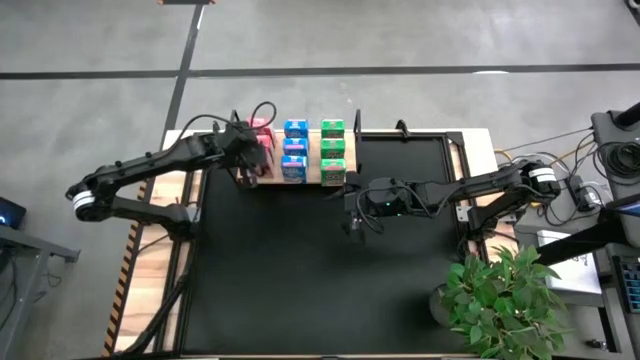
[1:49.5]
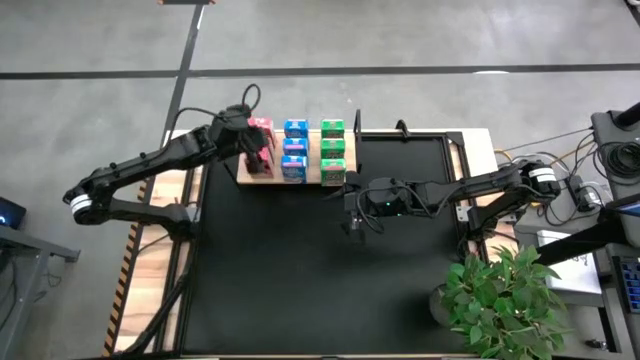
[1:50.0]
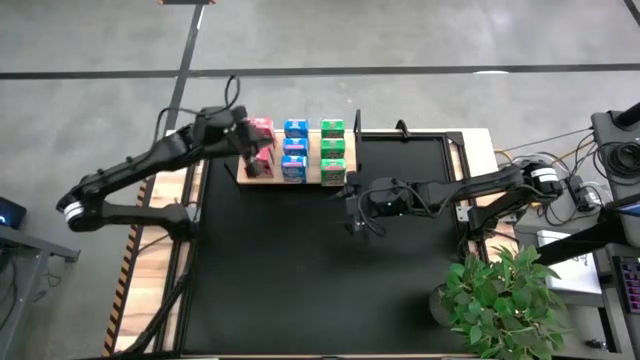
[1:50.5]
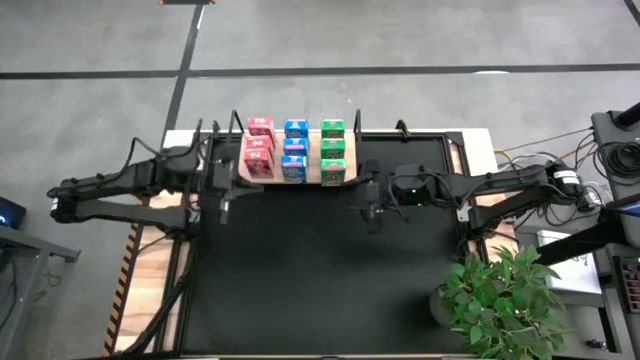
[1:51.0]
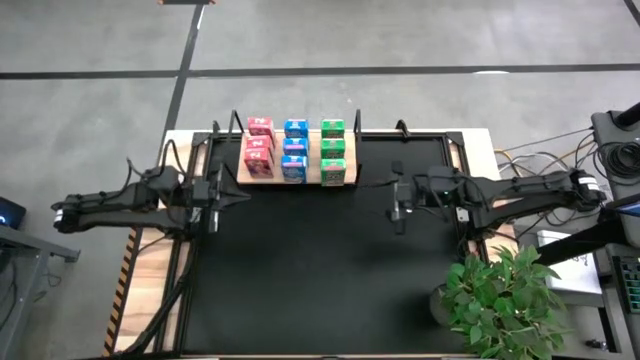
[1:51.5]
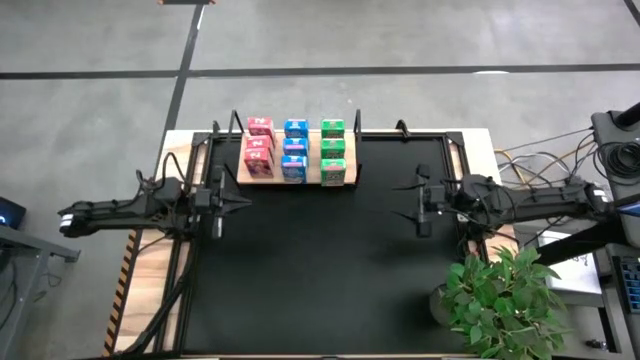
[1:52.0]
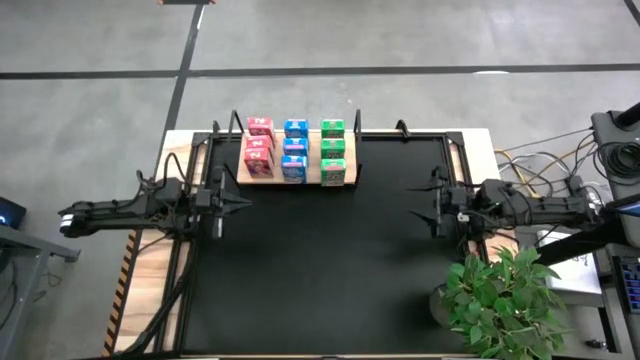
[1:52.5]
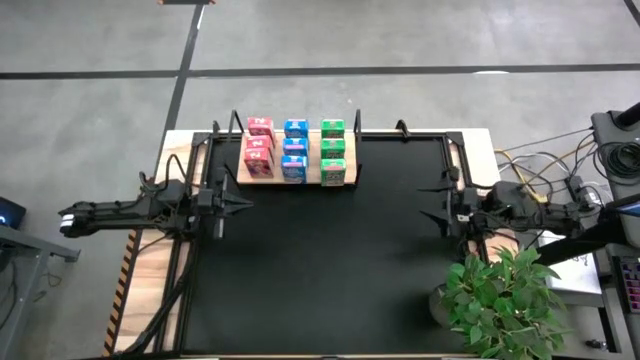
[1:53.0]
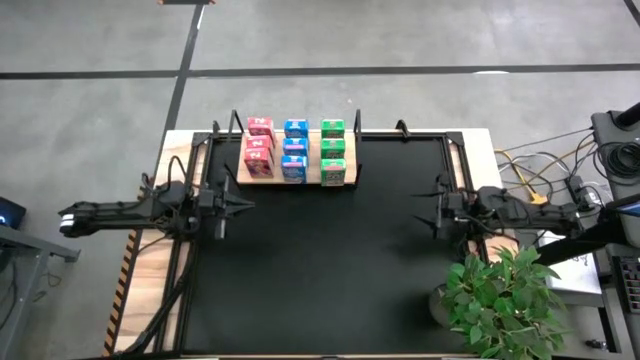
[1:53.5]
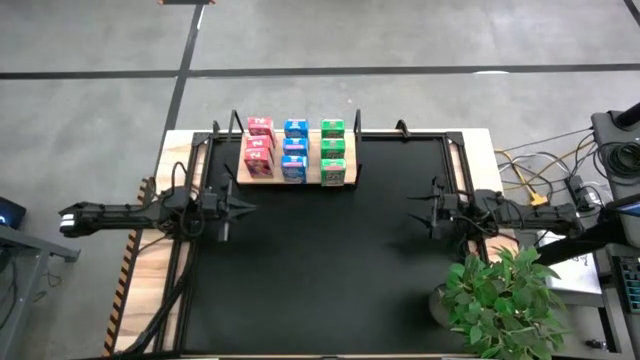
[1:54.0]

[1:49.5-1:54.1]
Task: Stack cereal on shelf
Return to Home Position

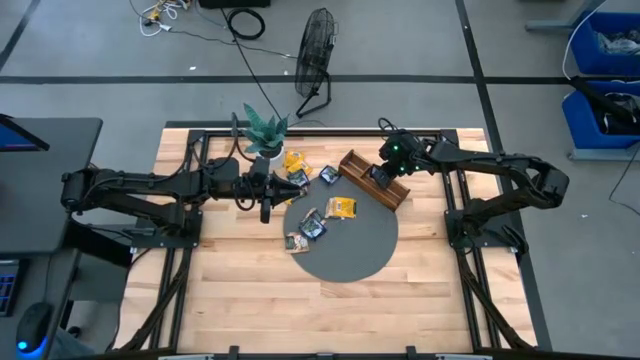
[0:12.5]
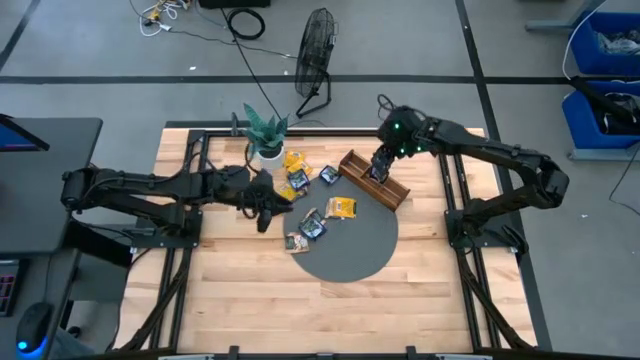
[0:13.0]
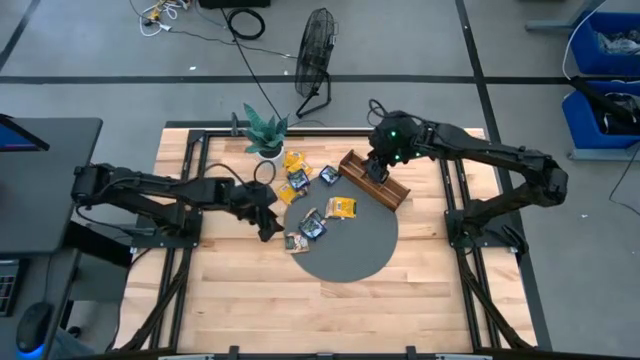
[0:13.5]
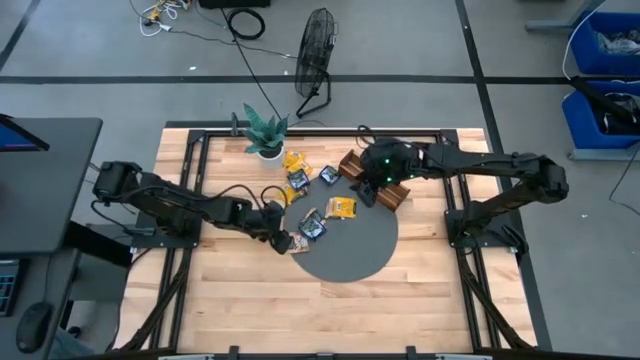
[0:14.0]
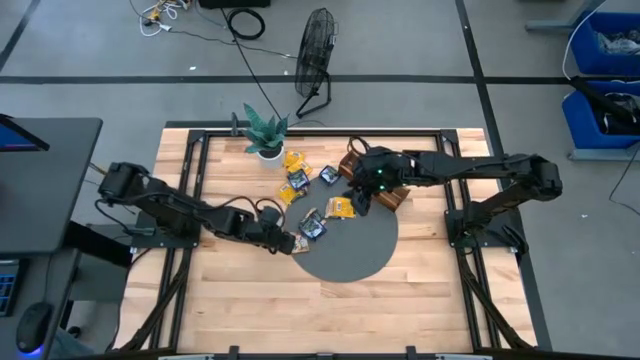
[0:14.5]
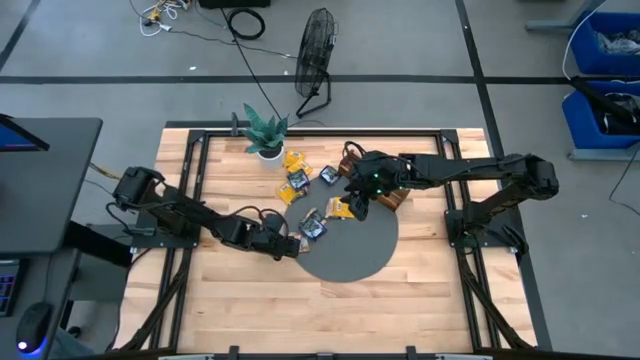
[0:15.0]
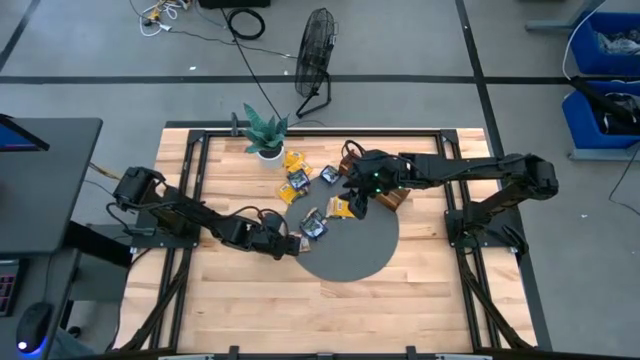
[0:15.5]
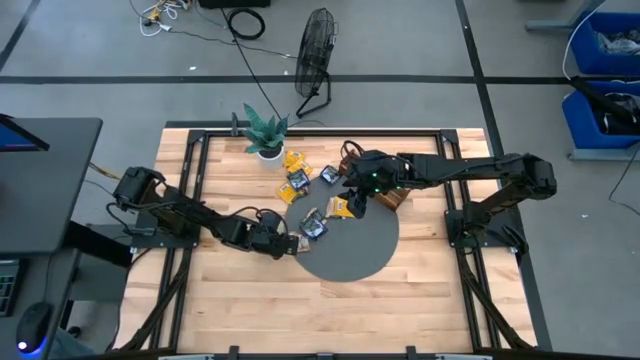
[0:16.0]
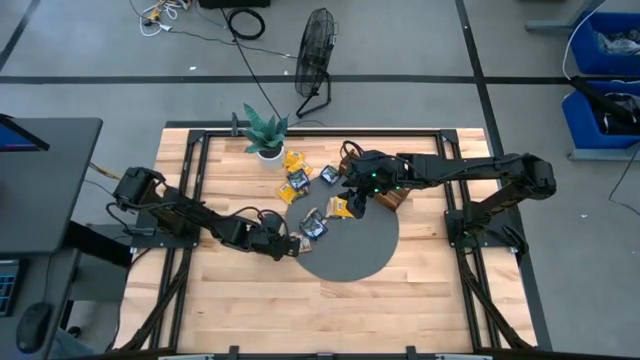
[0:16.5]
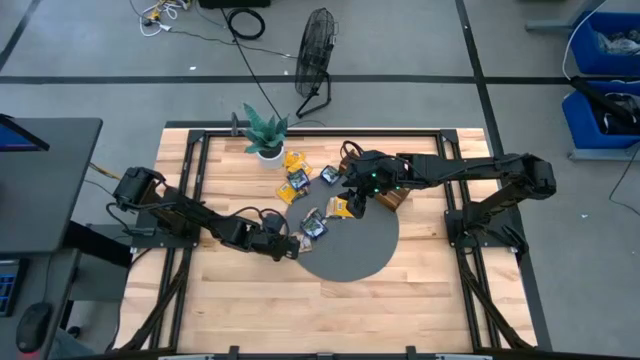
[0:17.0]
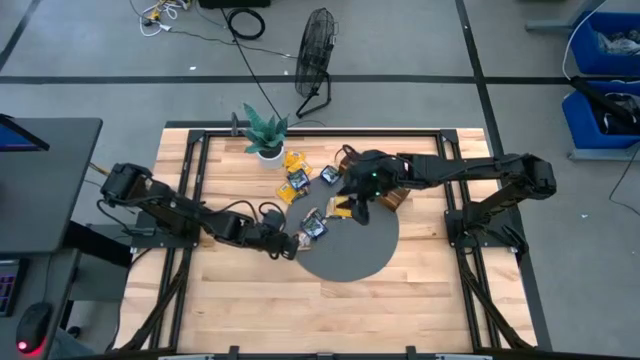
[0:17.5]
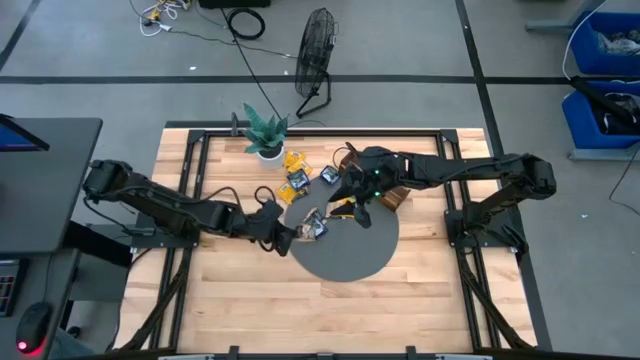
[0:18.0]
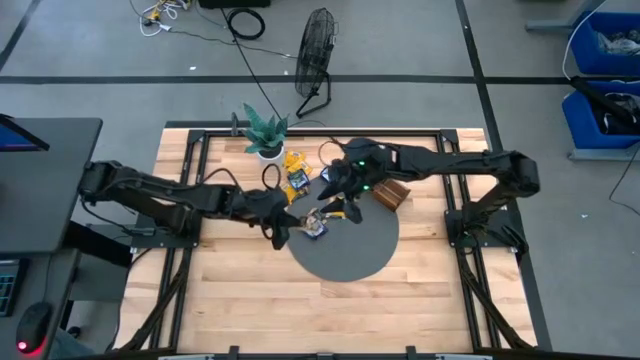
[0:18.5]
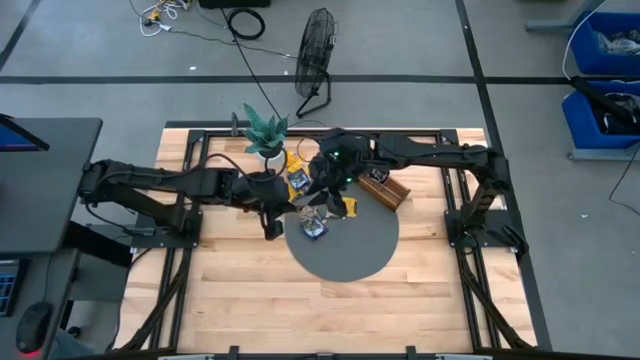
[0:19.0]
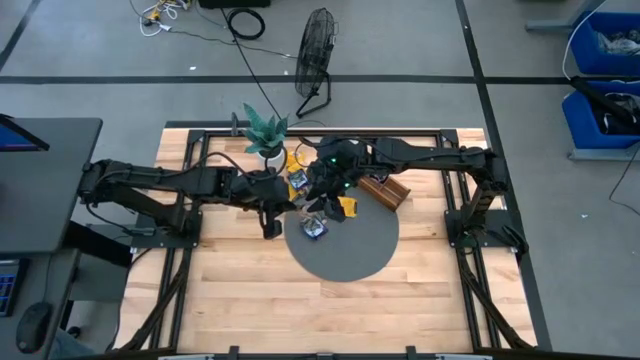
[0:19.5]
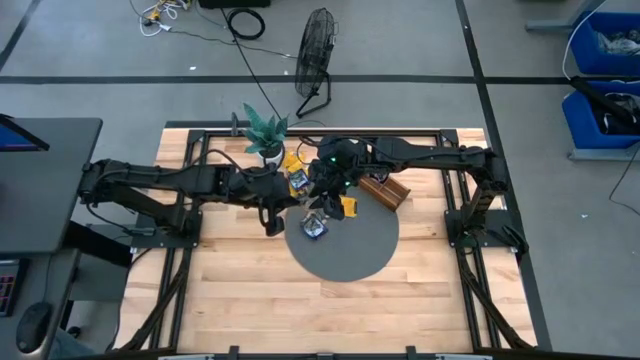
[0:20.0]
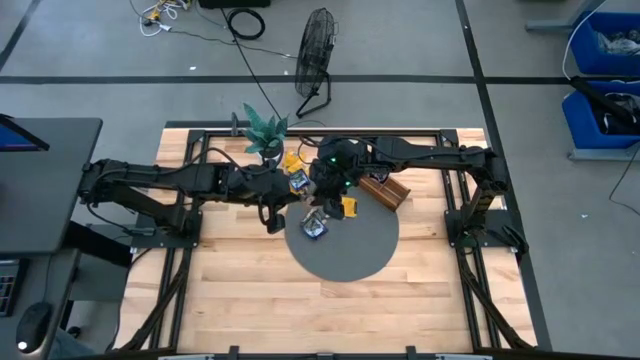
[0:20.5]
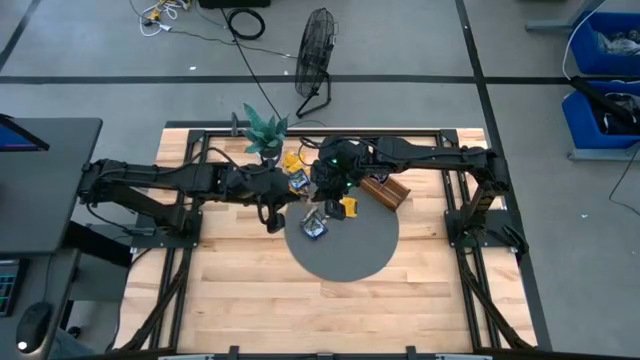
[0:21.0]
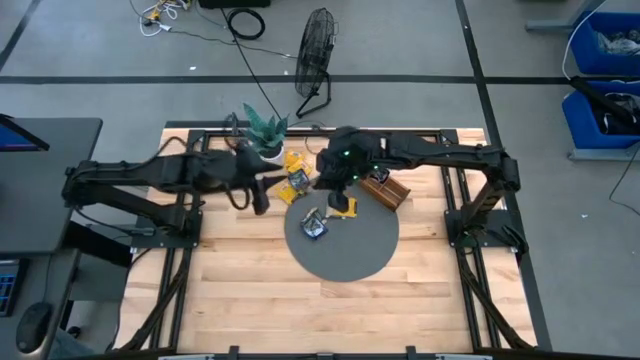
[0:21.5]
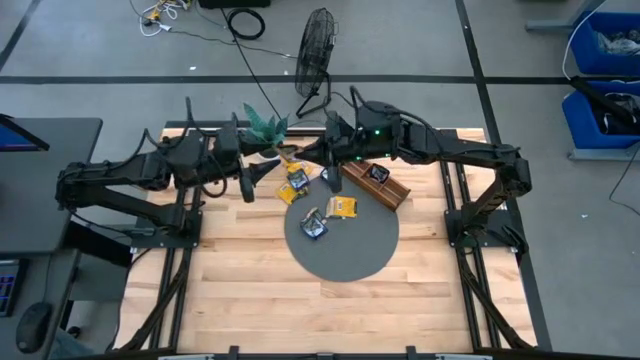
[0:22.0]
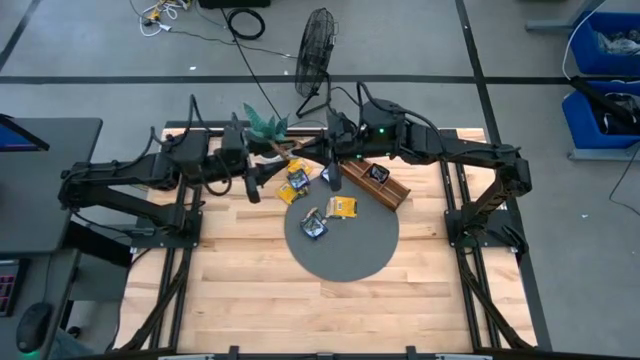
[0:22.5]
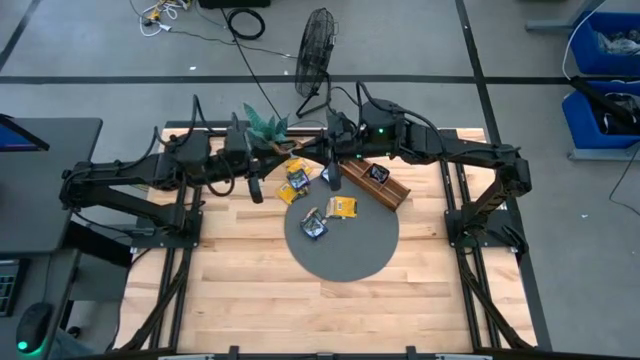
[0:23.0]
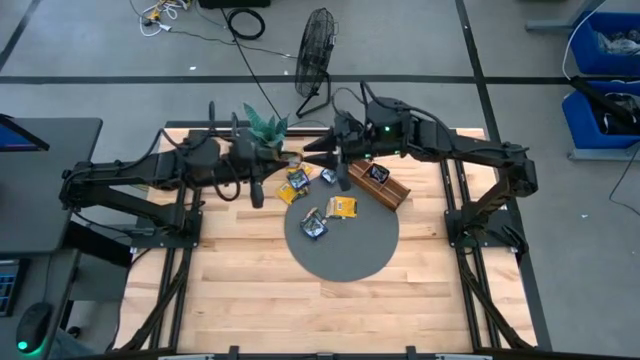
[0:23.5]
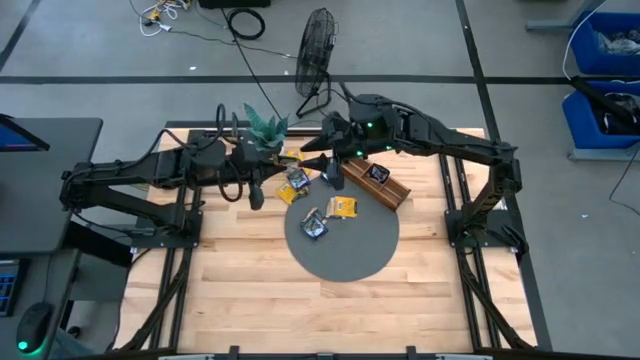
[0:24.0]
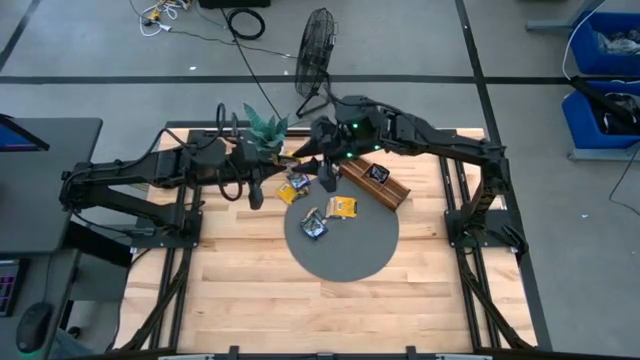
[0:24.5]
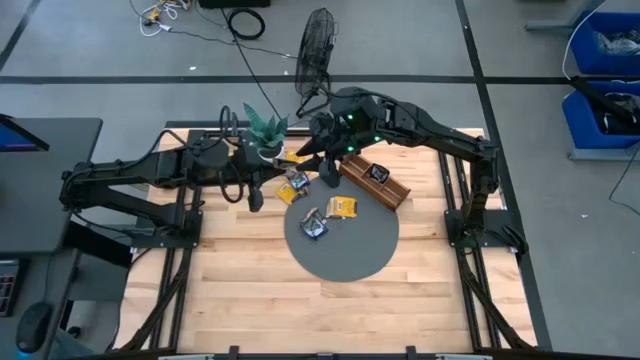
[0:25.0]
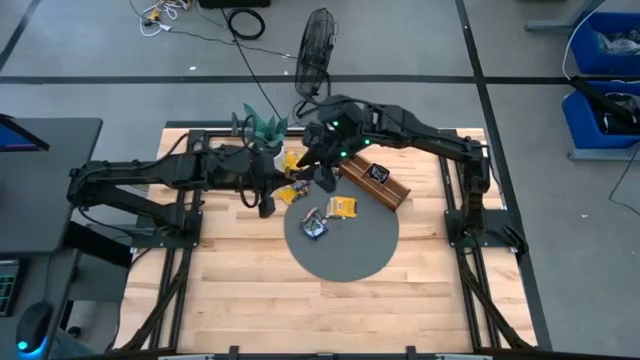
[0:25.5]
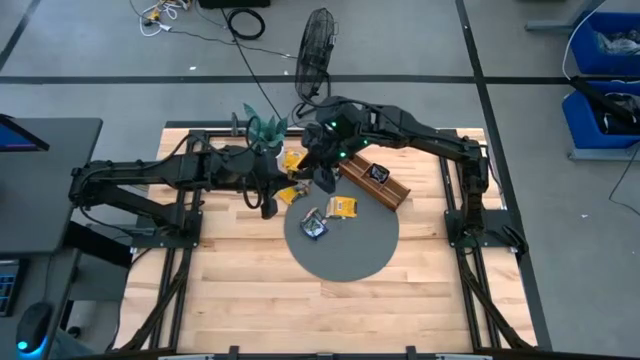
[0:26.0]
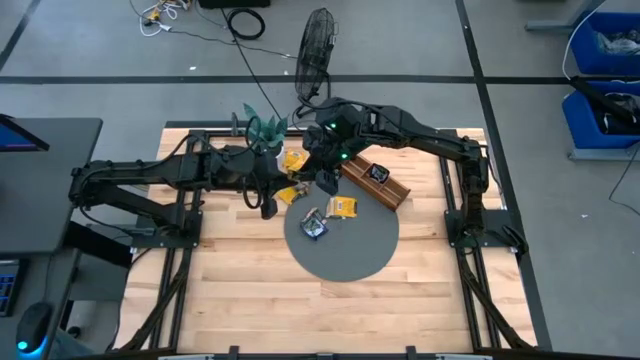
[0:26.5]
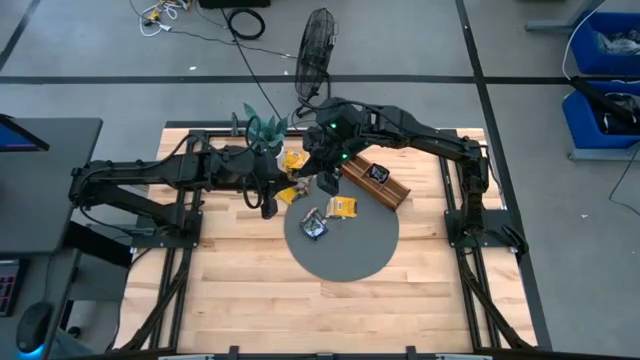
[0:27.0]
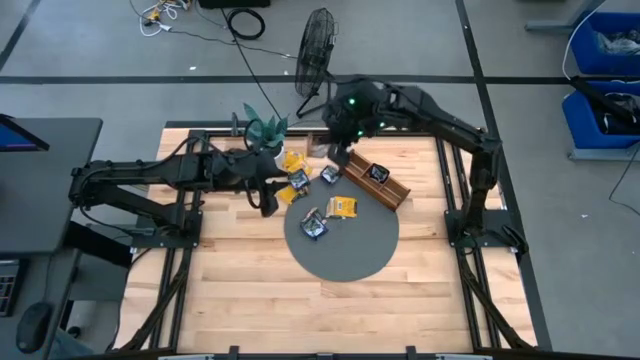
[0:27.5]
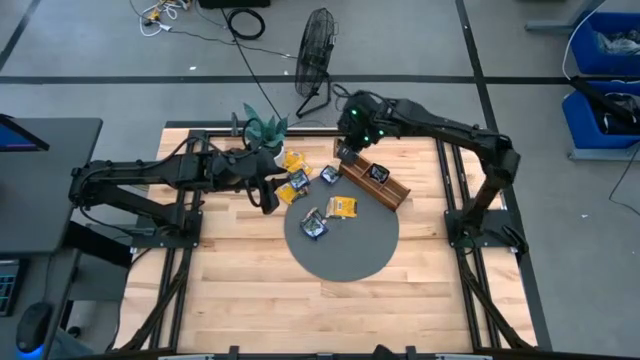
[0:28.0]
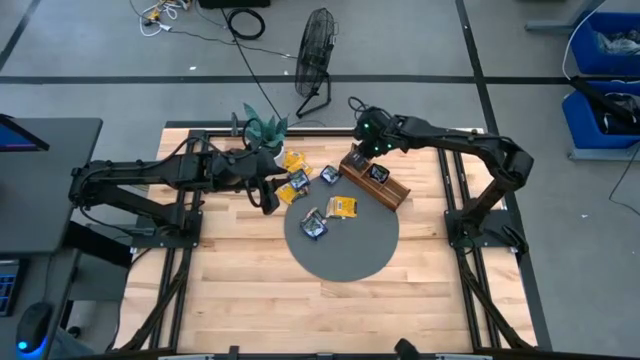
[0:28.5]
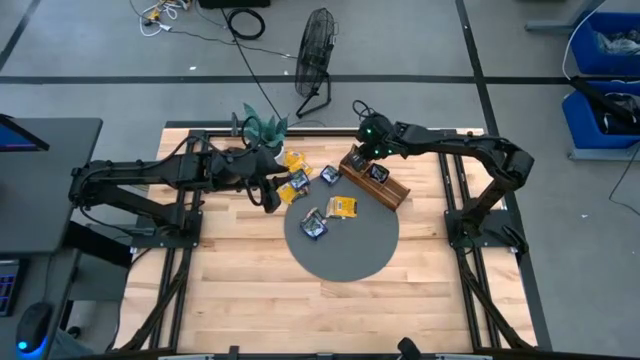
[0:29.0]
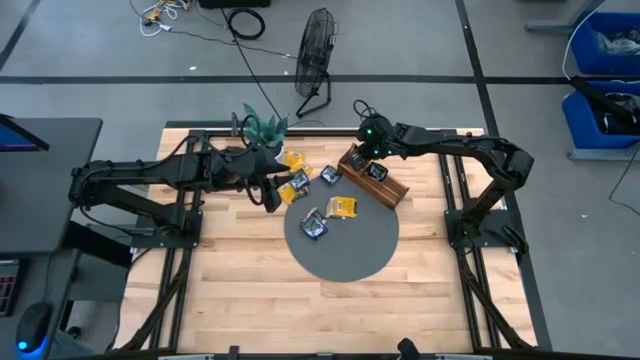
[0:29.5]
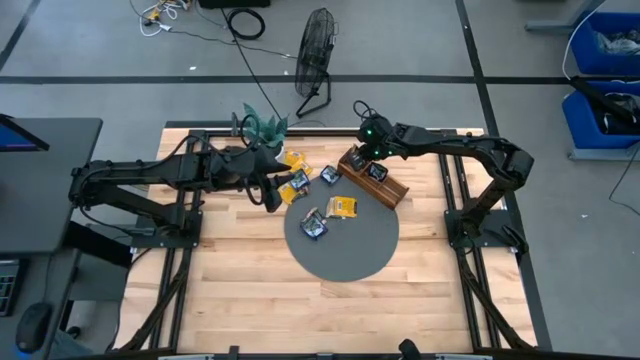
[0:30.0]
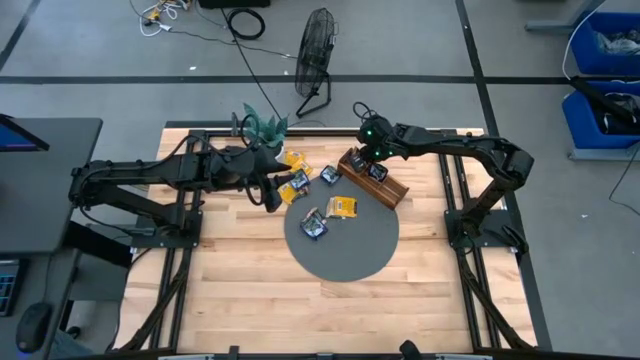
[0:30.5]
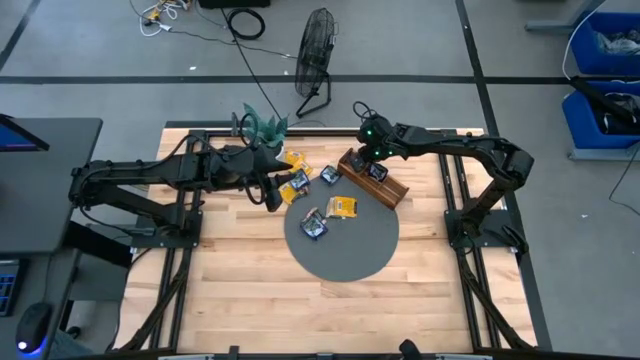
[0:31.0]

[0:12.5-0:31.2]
Task: Pick & Place Tea
Put the brown tea bag into the left section of the wooden organizer
